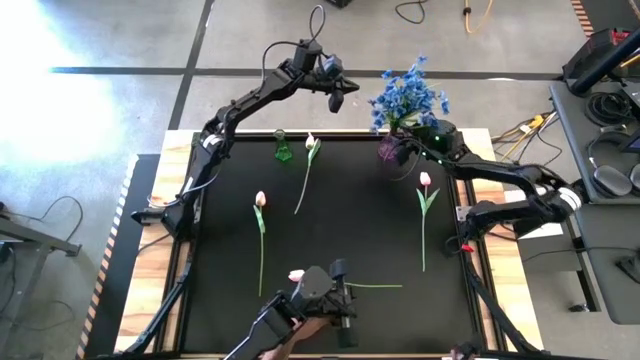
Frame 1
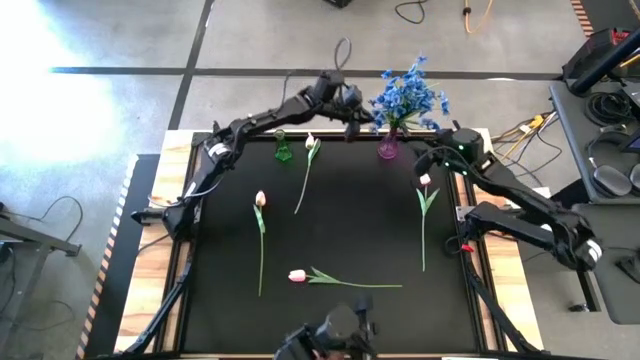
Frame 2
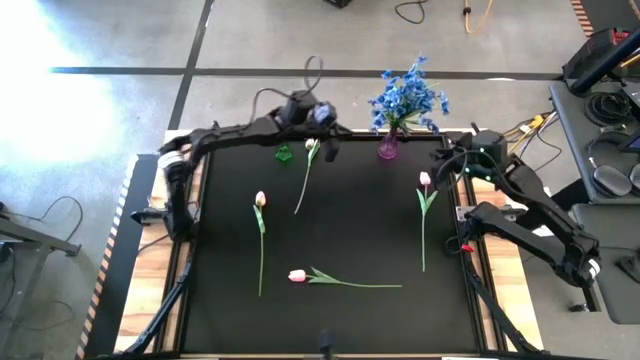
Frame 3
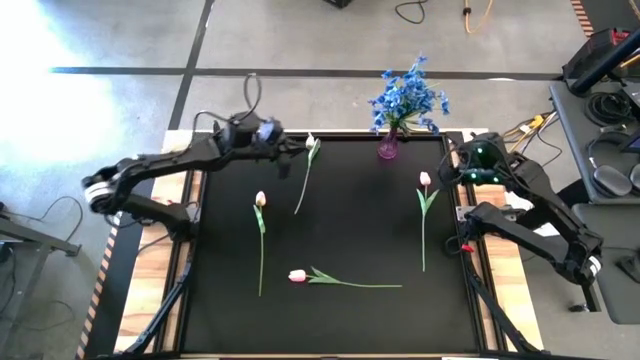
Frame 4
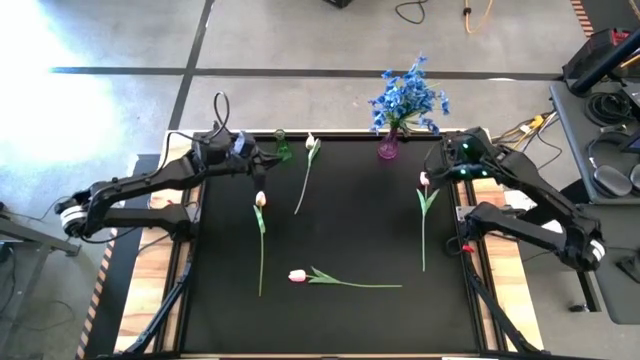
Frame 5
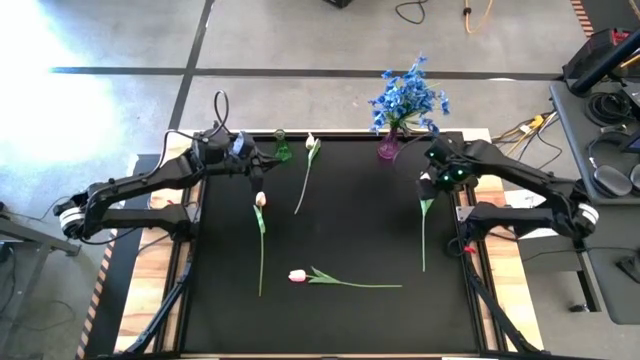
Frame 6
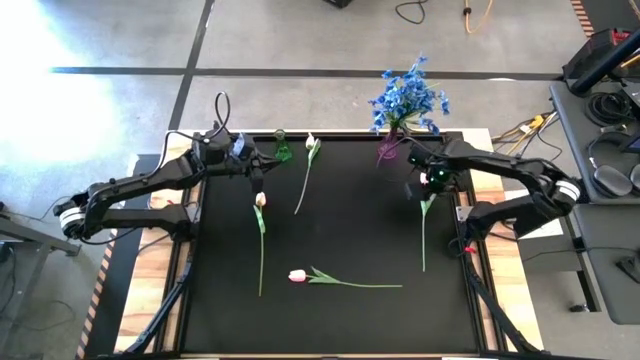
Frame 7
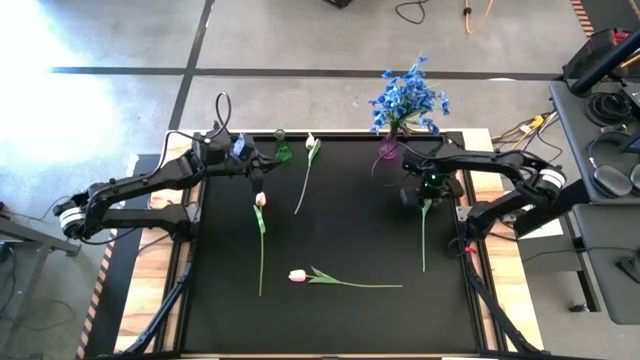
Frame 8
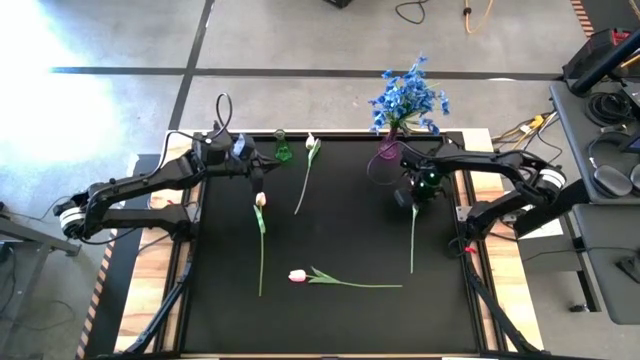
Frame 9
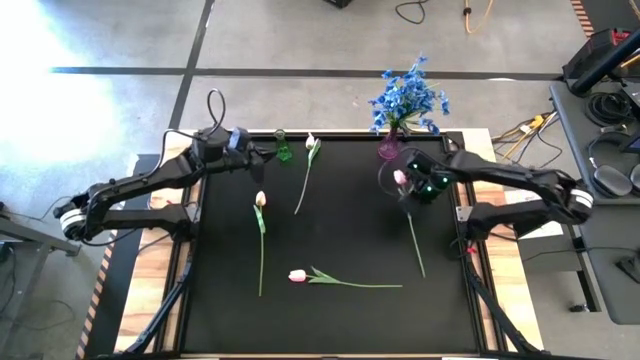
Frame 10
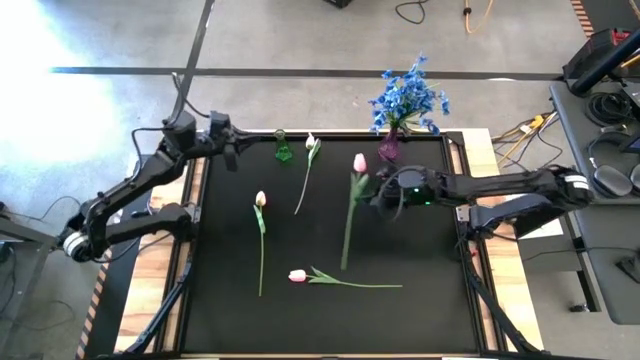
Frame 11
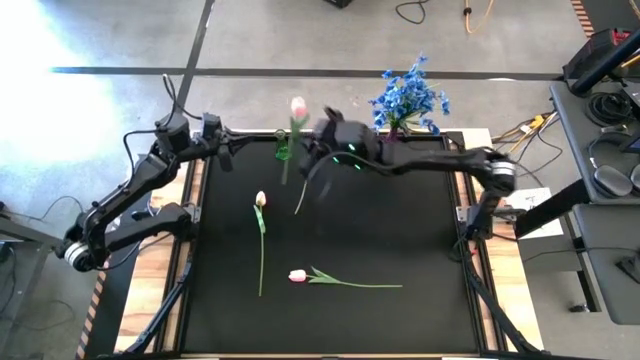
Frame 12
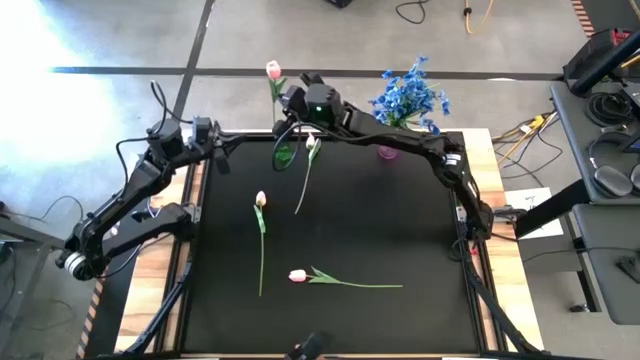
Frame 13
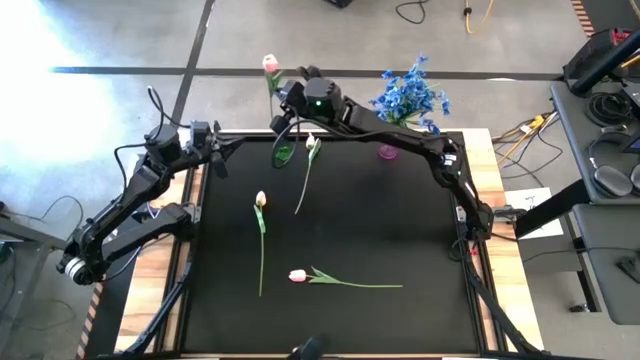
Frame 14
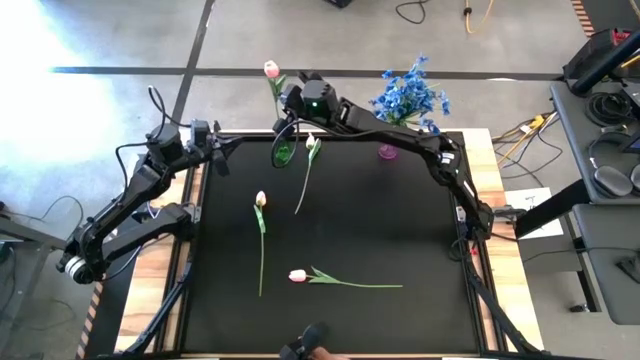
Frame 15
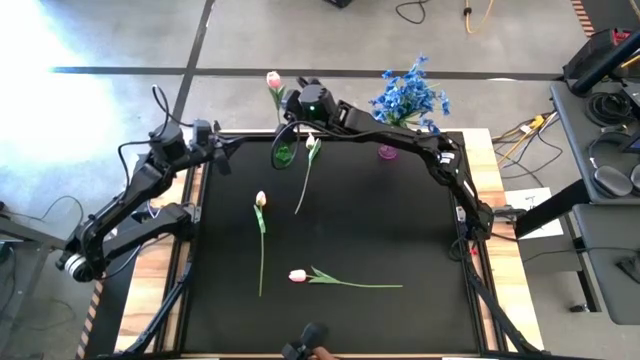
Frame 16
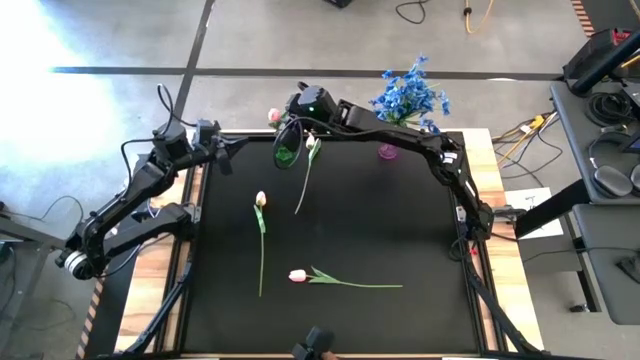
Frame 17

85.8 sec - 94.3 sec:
Task: Sort flowers into vase by color
Put the pink tulip into the green vase

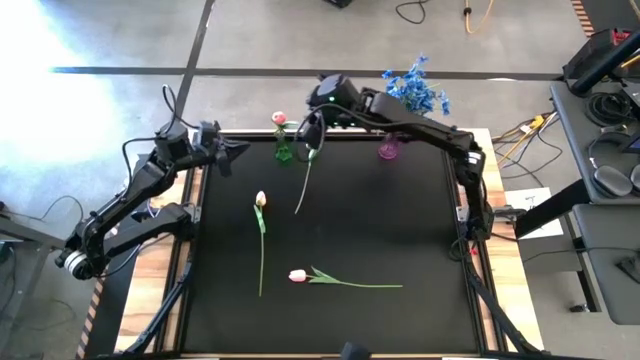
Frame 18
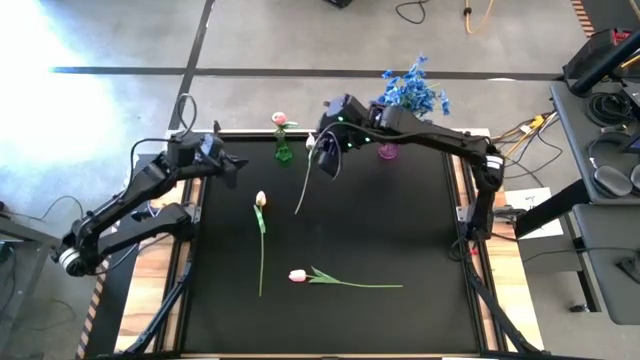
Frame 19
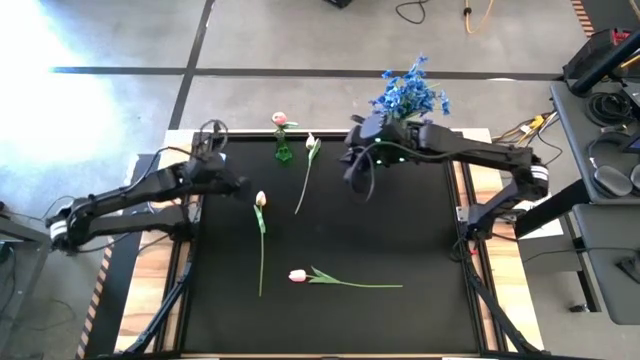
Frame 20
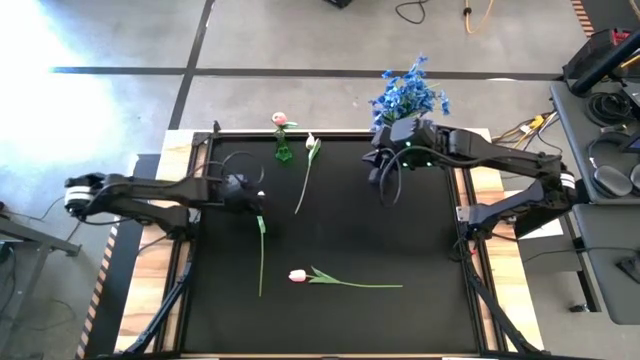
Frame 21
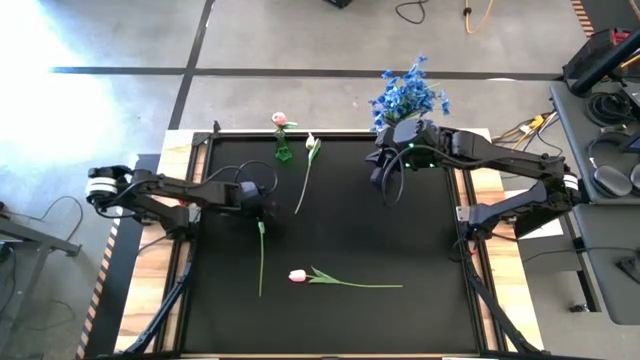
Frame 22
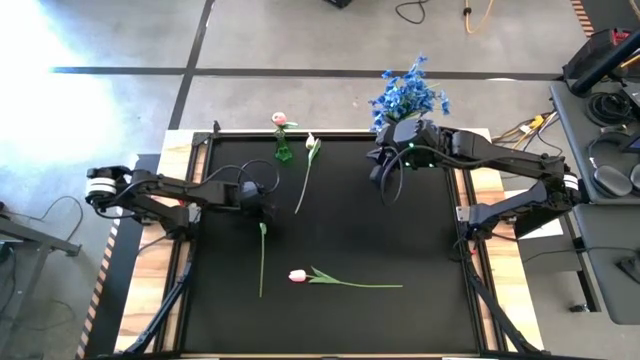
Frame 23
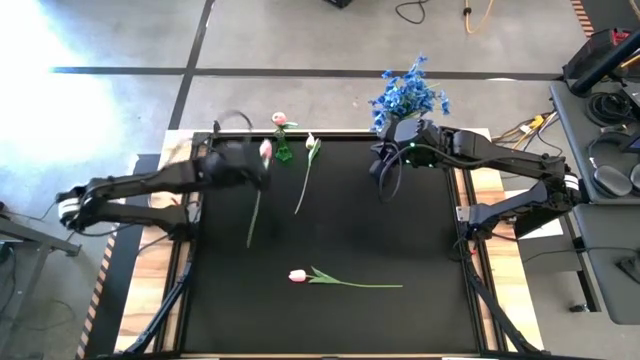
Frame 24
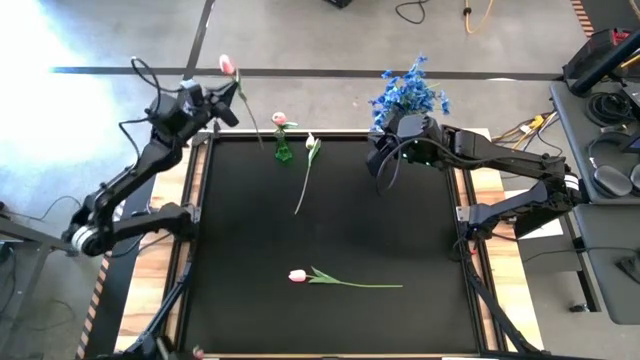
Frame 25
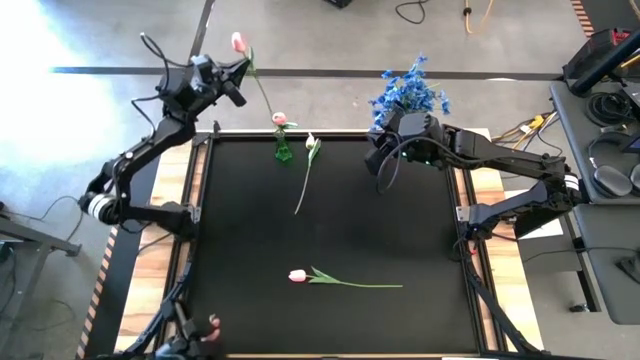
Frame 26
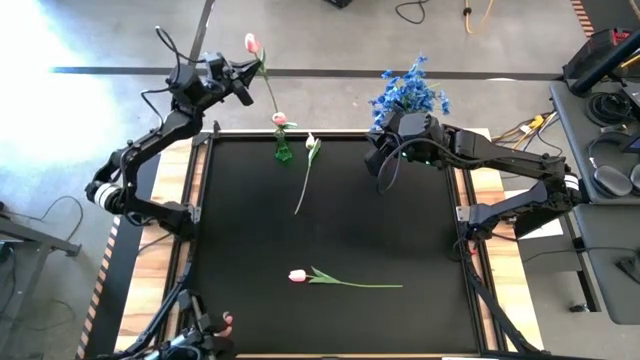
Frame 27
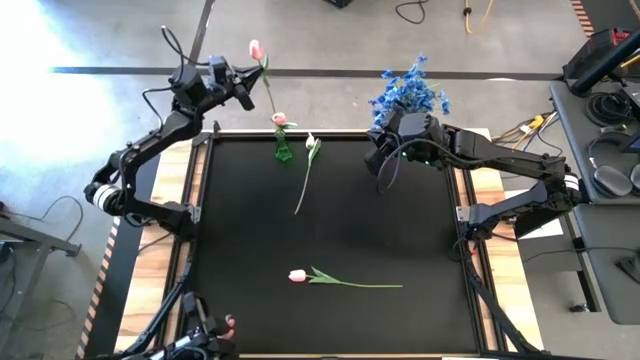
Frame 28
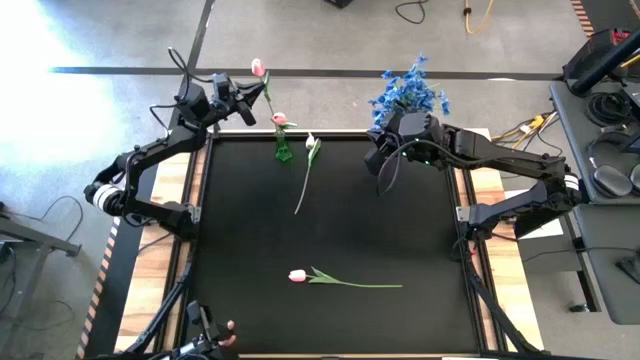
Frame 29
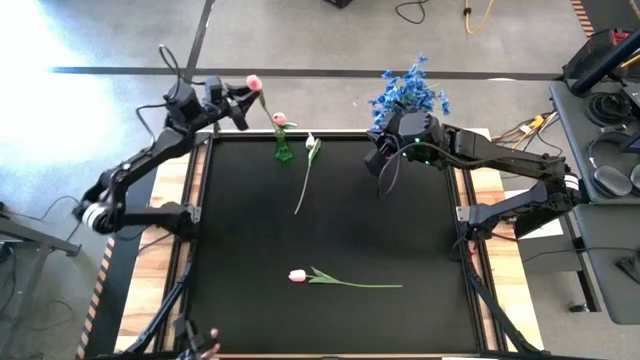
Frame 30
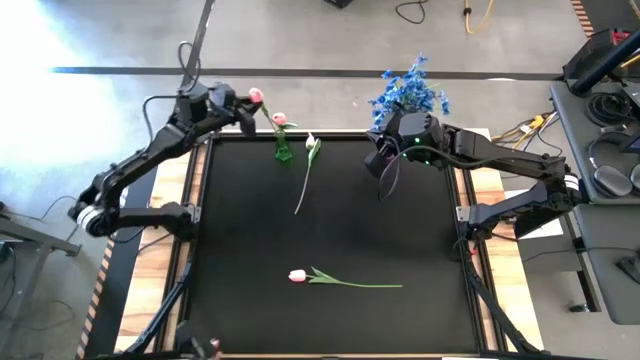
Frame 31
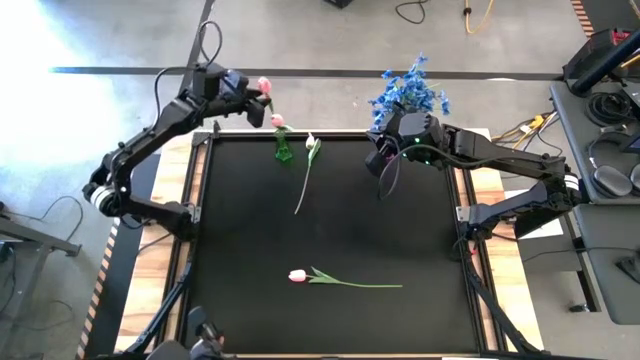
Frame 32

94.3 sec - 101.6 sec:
Put the pink tulip into the green vase

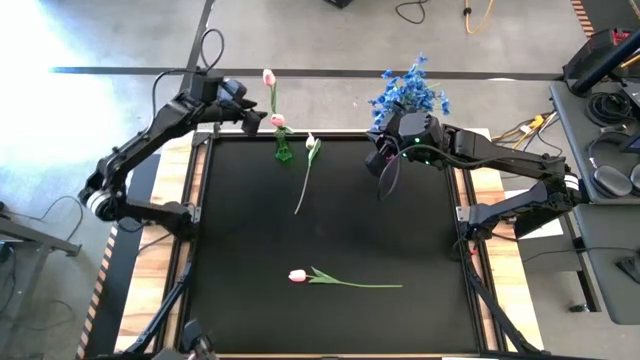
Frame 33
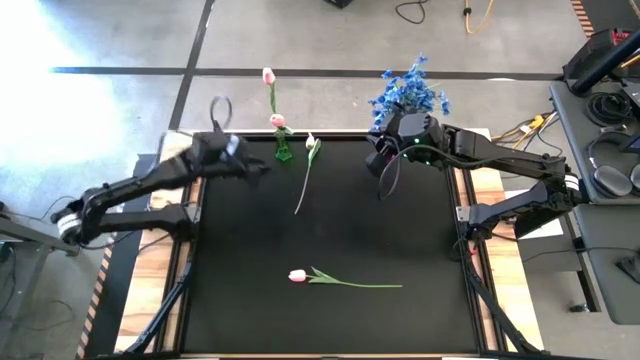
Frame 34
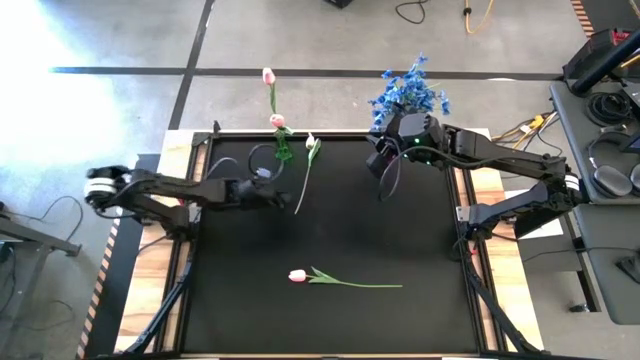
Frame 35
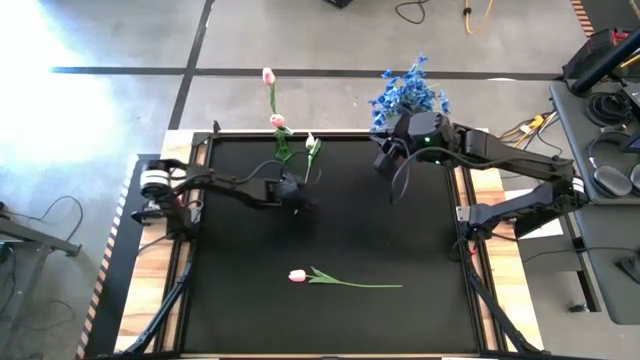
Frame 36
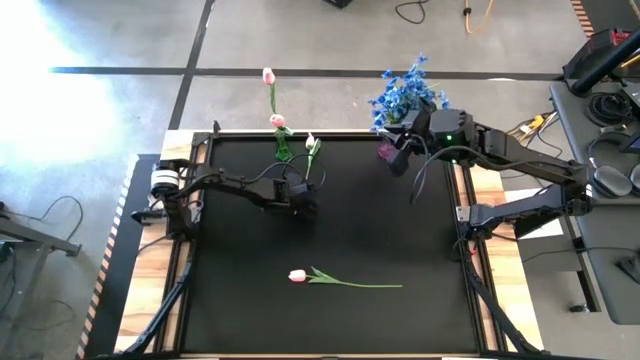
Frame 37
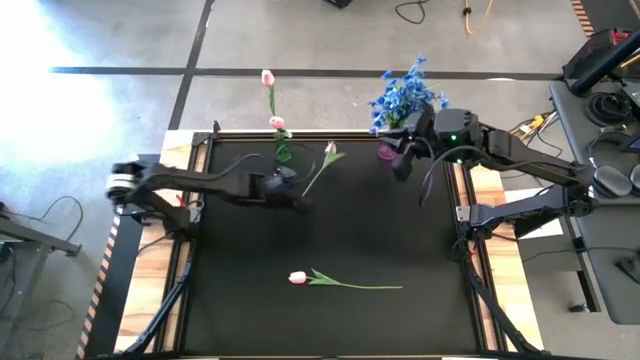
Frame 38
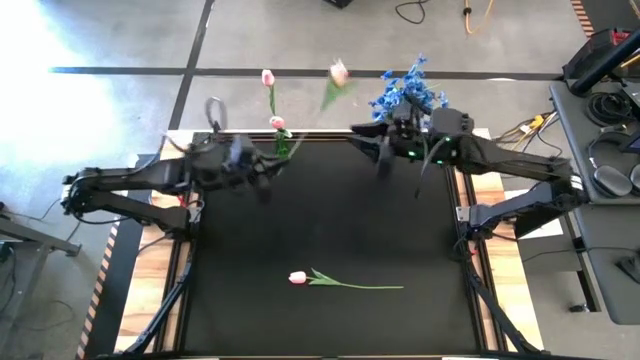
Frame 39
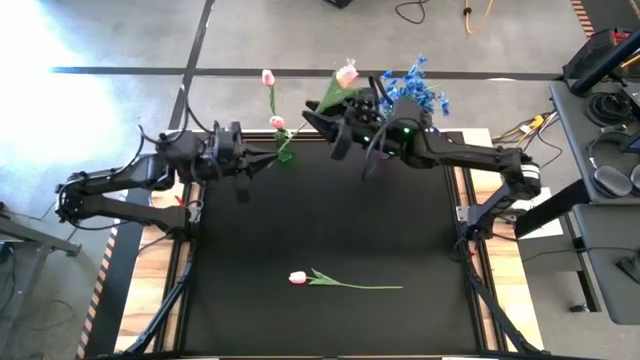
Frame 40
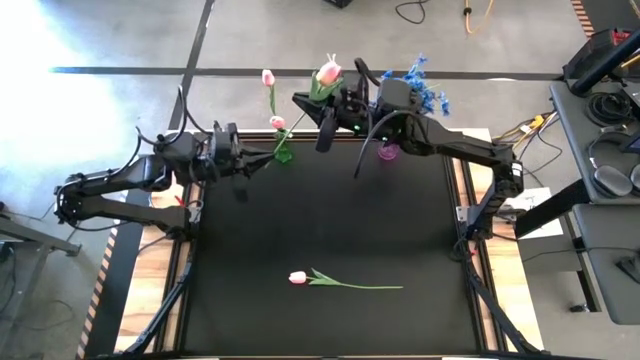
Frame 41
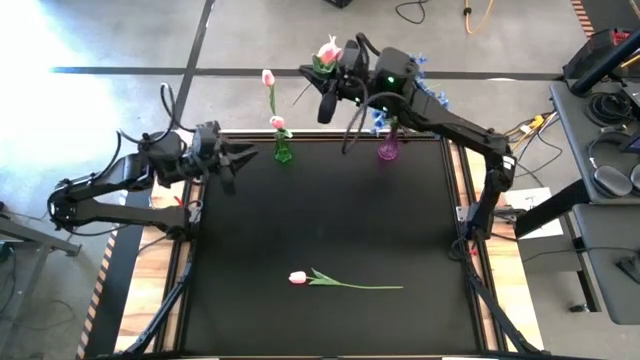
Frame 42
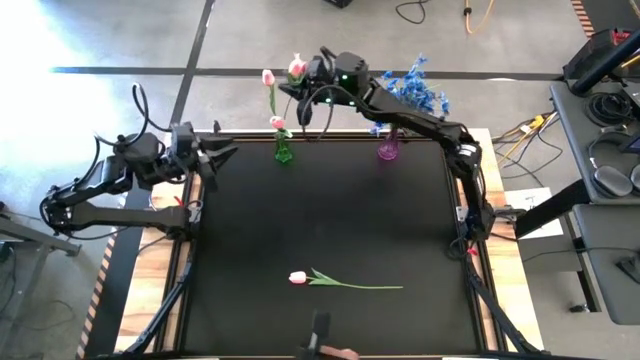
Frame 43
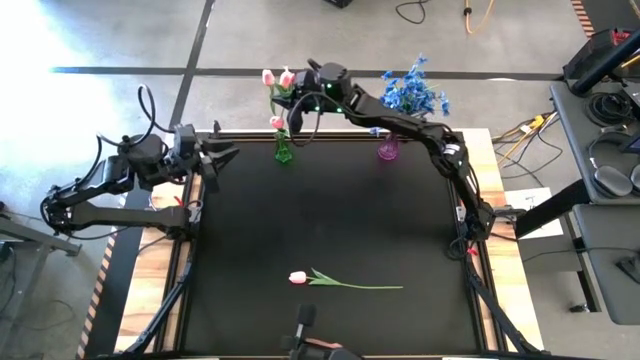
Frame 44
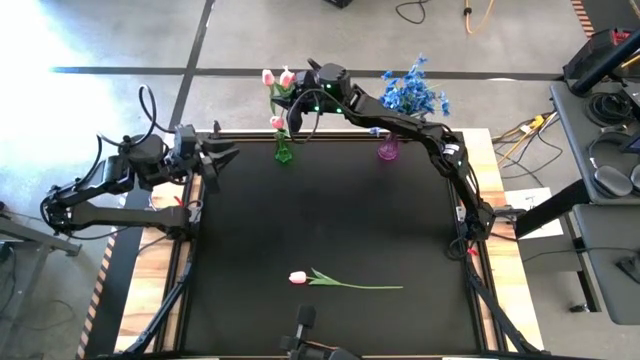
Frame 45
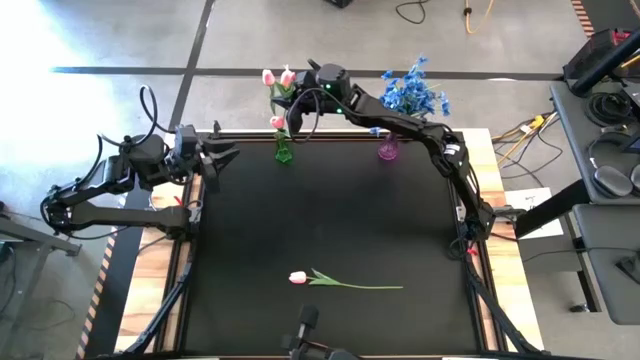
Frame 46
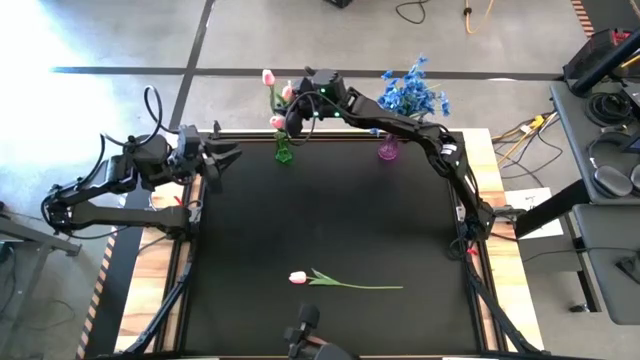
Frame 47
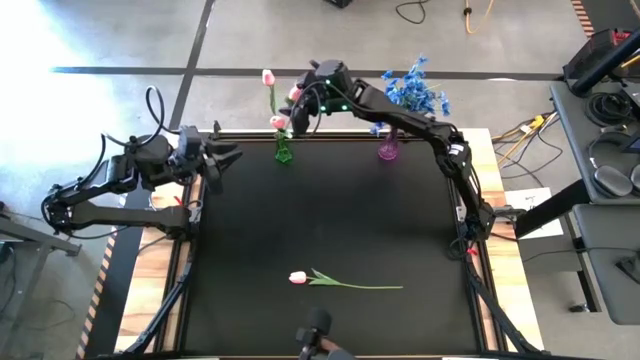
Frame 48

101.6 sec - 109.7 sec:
Put the pink tulip into the green vase
